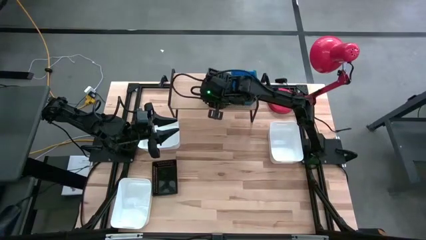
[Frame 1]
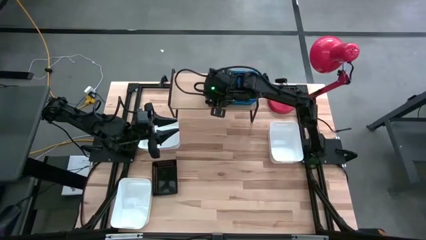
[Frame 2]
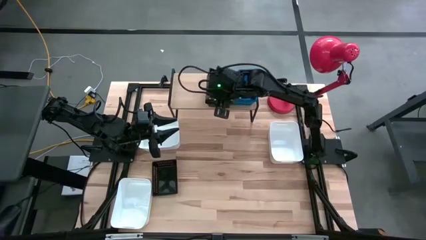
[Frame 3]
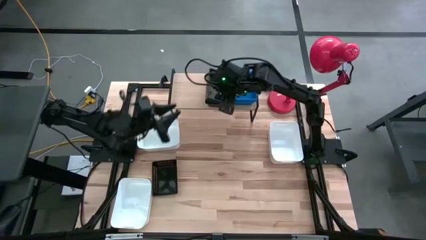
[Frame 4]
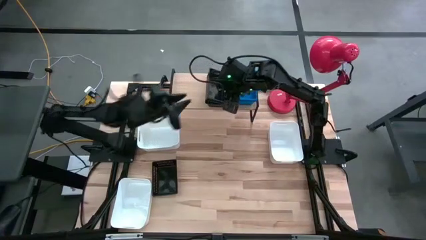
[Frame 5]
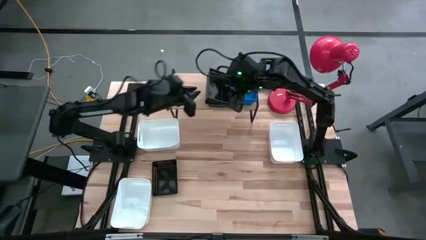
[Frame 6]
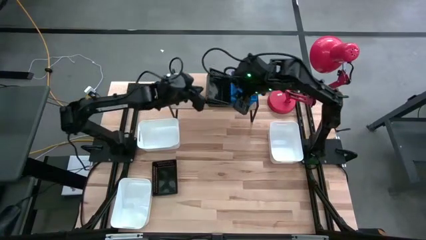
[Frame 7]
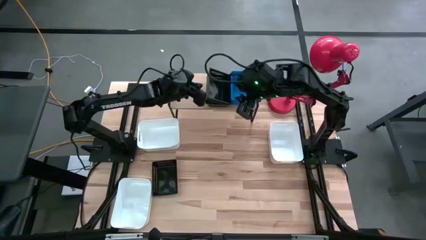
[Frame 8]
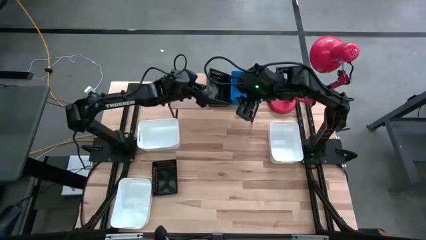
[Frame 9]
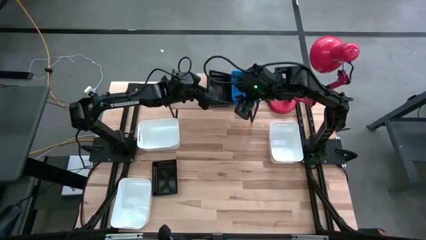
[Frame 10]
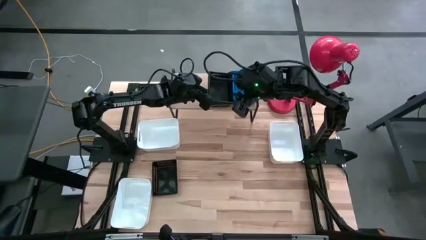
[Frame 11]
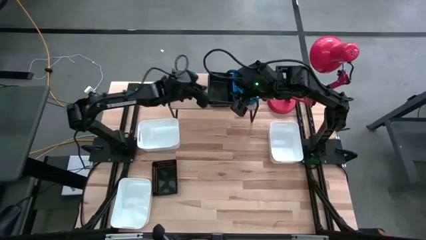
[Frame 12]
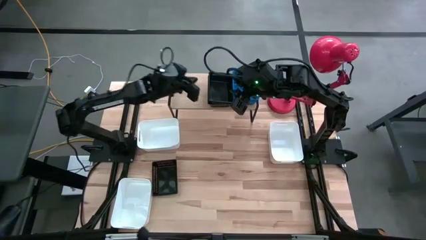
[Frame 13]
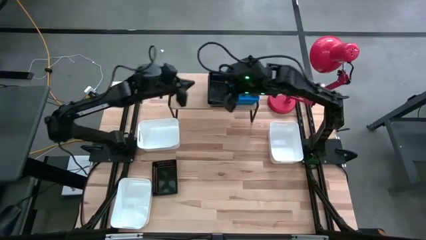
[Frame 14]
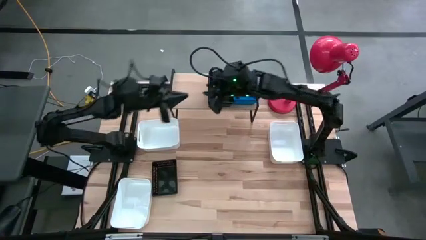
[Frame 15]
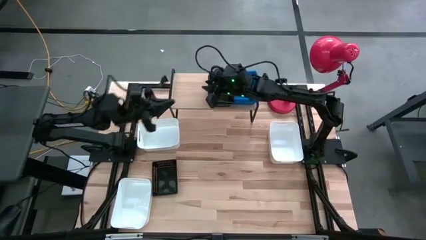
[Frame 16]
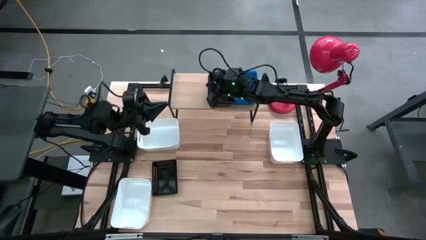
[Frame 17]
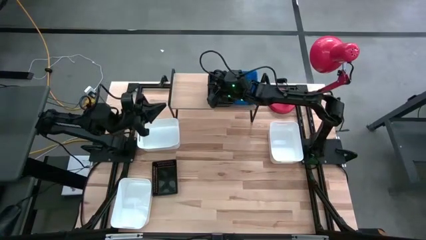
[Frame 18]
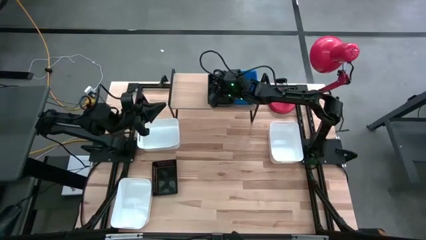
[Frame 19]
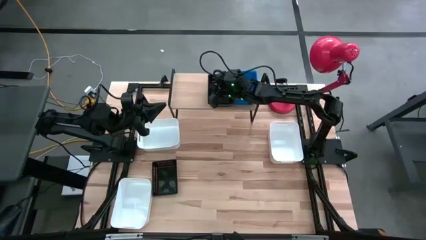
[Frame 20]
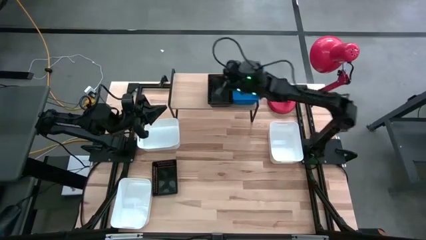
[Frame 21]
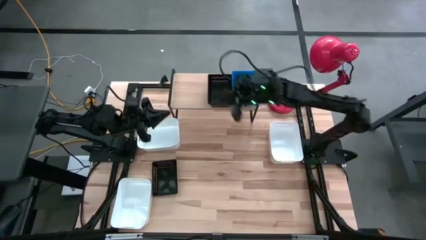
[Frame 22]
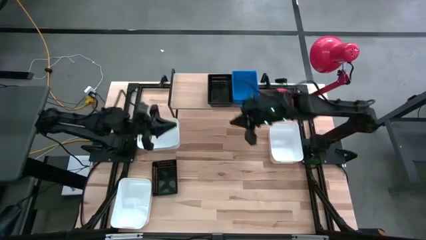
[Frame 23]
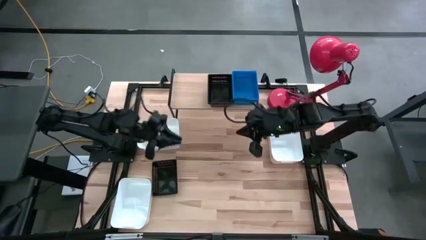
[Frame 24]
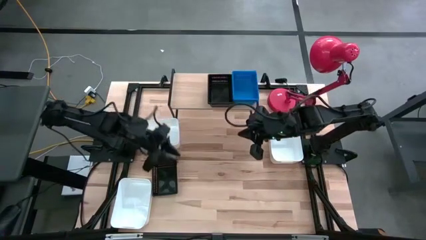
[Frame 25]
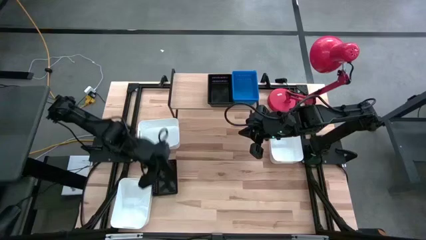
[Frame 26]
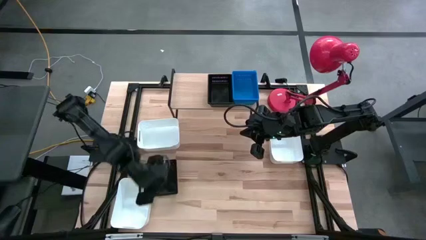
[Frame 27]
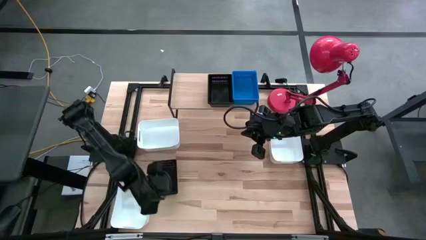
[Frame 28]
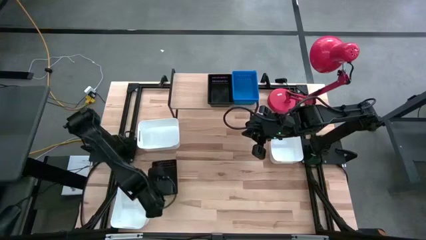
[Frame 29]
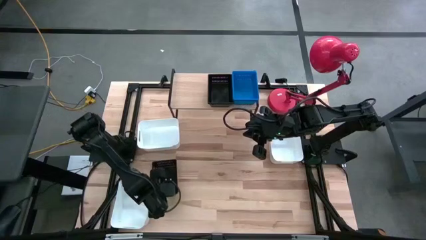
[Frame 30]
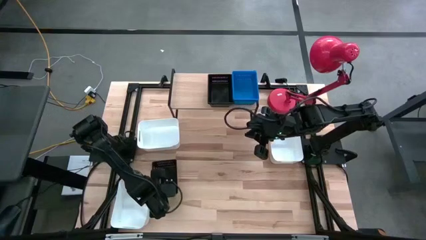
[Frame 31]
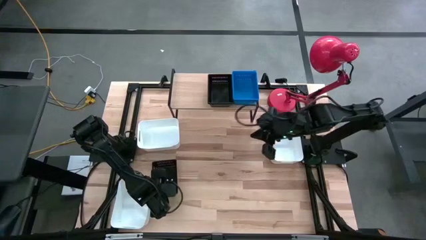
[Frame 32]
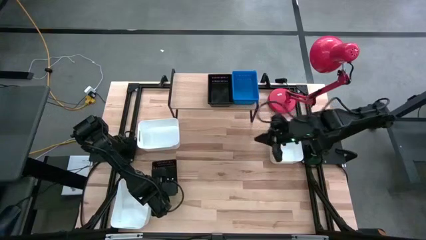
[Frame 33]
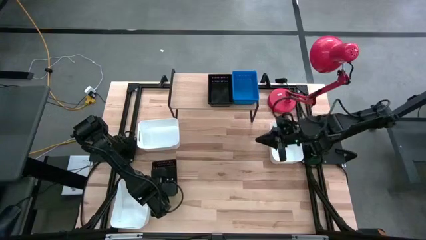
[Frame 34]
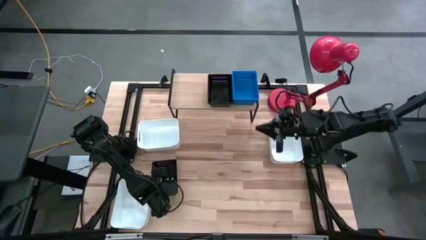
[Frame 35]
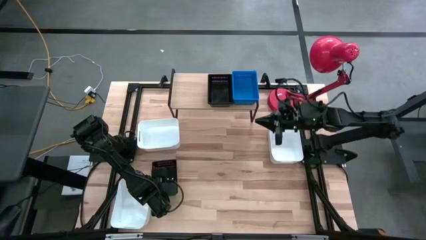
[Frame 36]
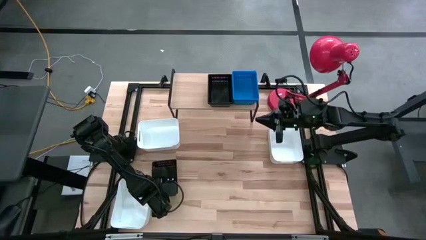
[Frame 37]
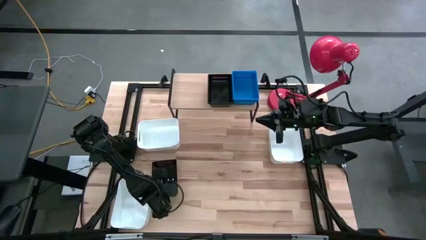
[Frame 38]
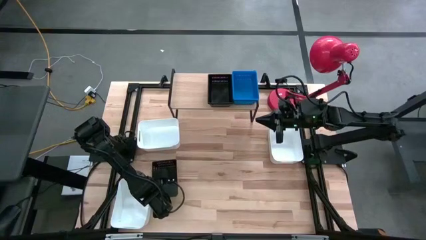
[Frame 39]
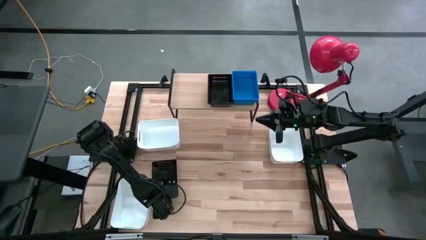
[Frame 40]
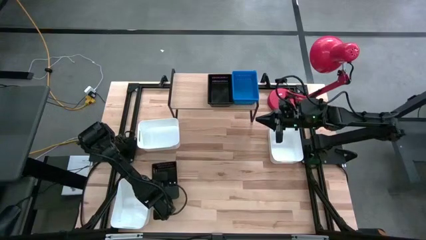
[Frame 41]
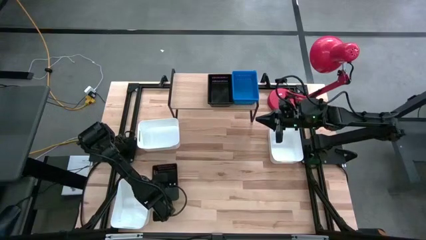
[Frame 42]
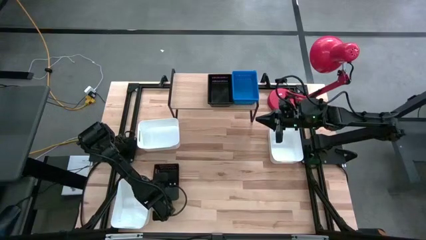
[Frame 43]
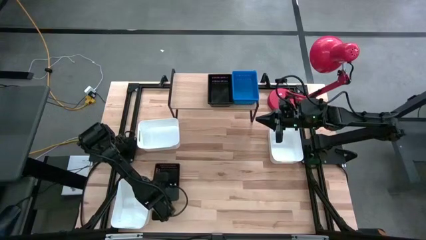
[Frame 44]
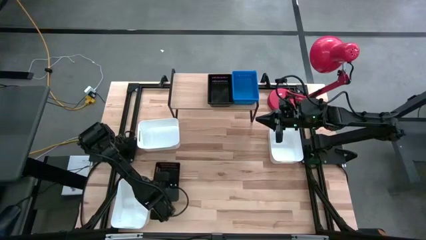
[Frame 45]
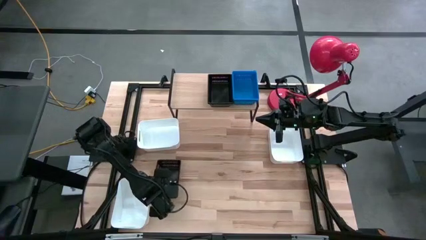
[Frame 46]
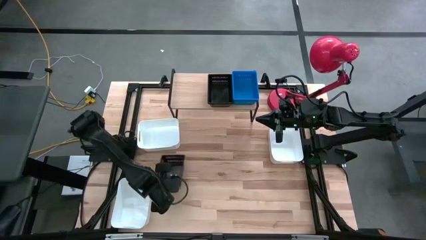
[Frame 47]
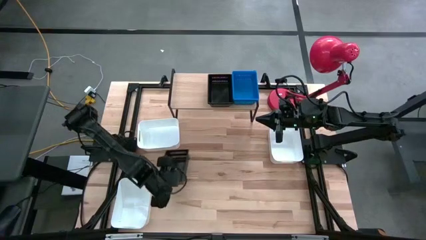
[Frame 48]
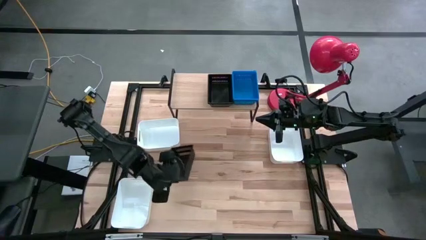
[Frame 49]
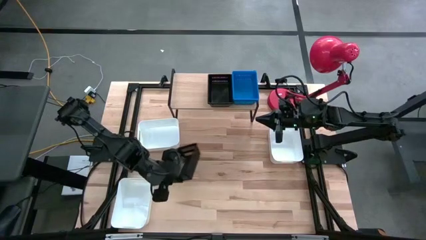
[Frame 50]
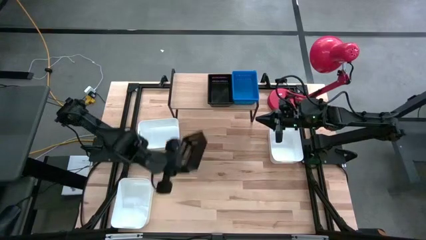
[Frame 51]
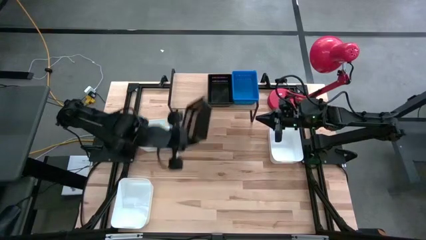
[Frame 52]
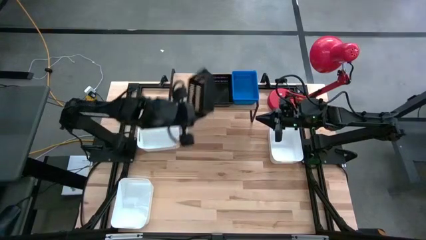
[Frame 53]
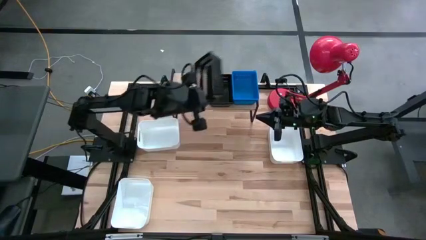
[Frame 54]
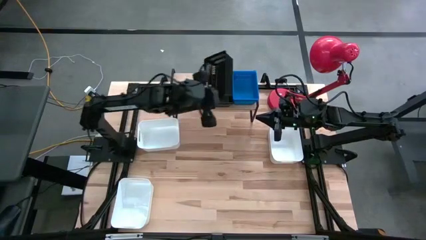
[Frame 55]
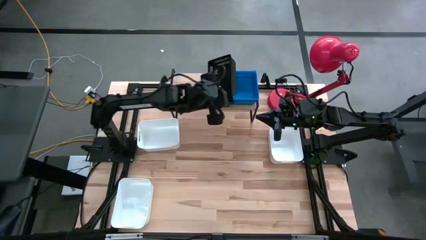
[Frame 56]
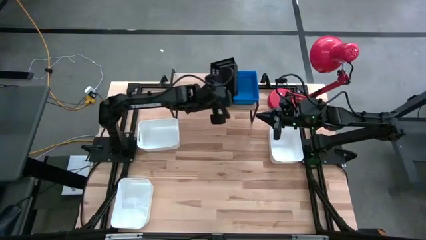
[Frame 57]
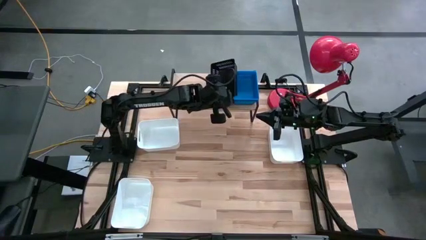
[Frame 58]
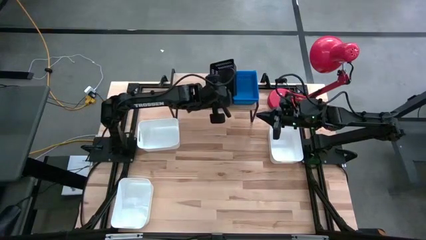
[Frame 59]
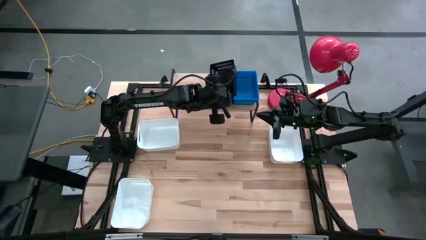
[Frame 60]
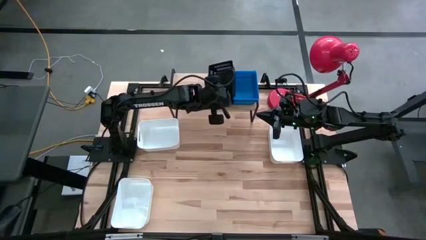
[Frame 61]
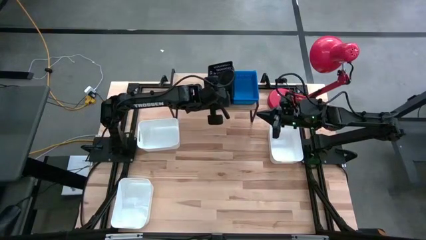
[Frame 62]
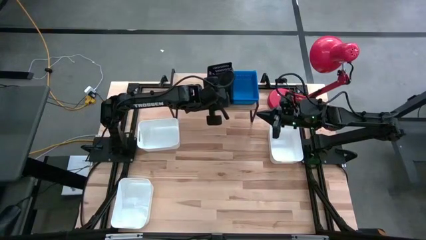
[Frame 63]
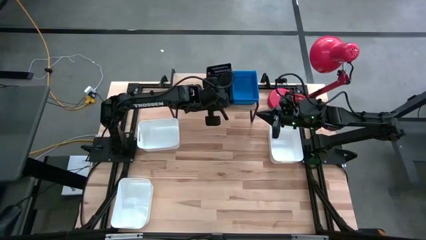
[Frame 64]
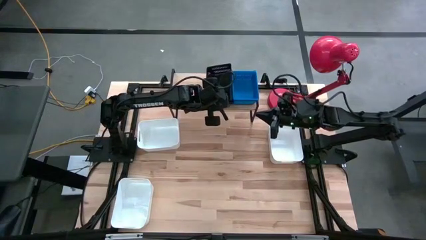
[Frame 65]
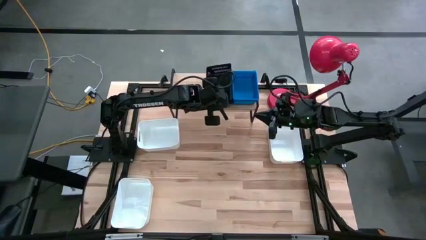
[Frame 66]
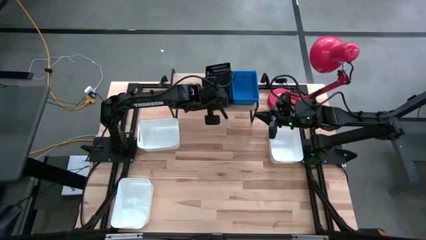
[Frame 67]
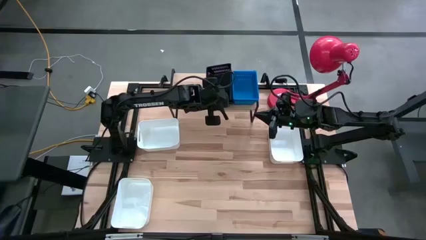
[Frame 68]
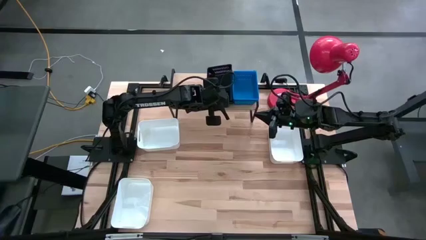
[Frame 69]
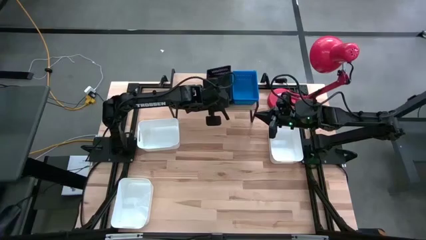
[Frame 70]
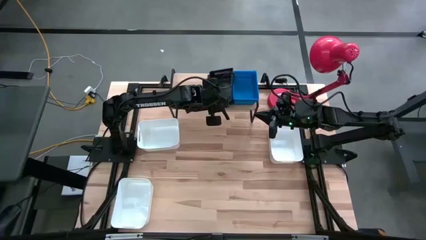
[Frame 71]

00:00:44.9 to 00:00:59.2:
Task: Stack baskets on shelf by color
Stack the black bin on top of the black bin on the shelf
